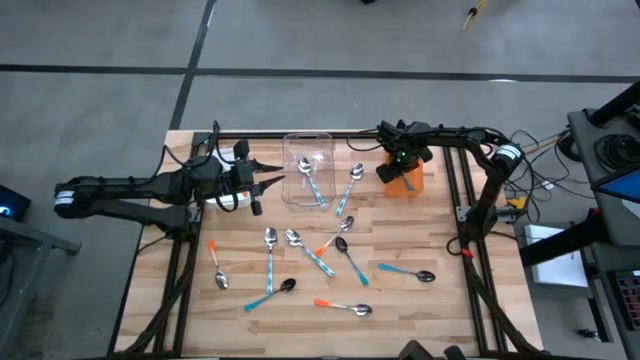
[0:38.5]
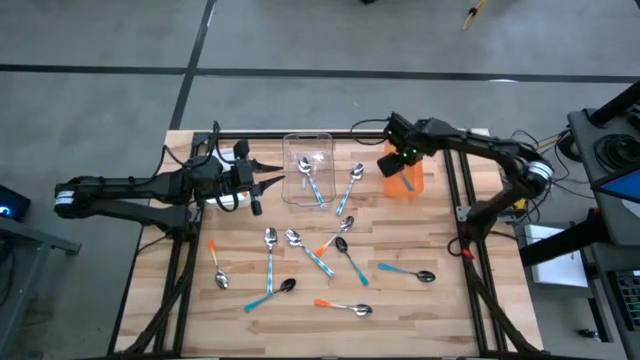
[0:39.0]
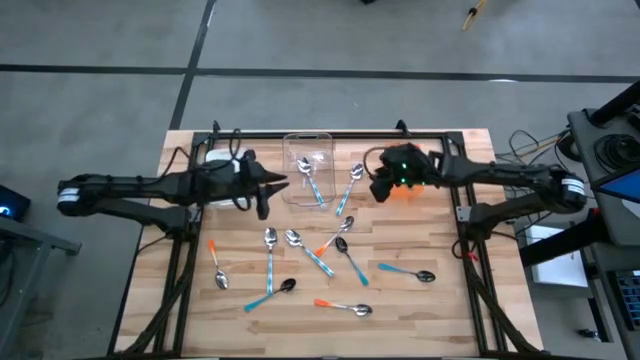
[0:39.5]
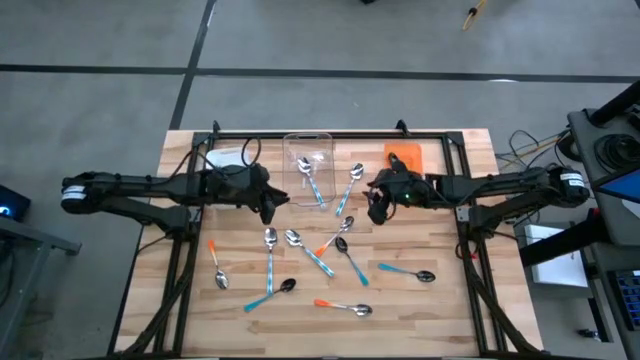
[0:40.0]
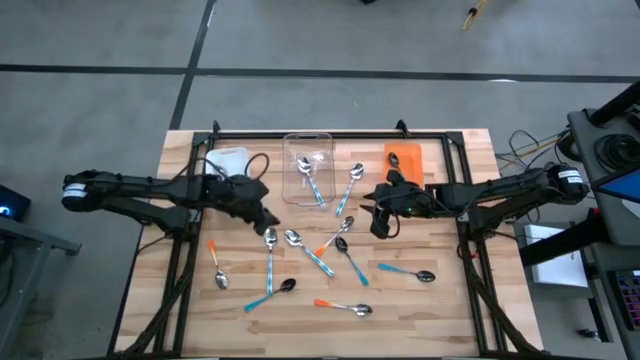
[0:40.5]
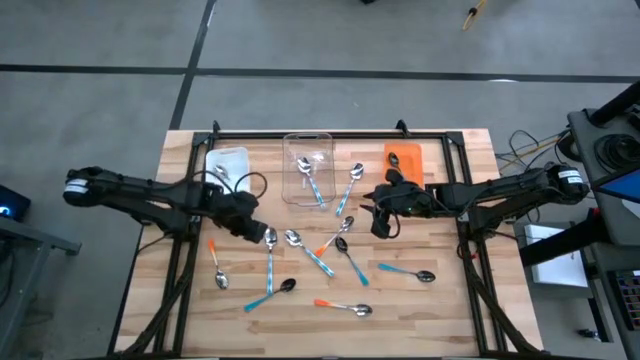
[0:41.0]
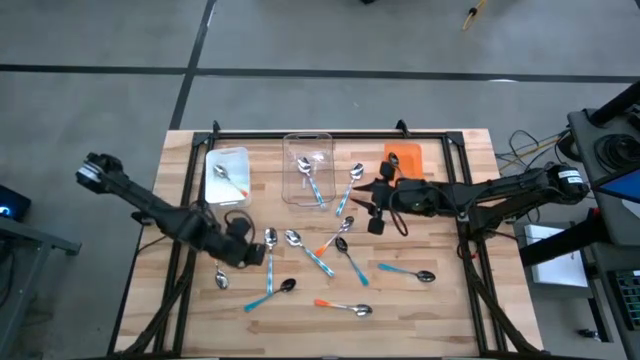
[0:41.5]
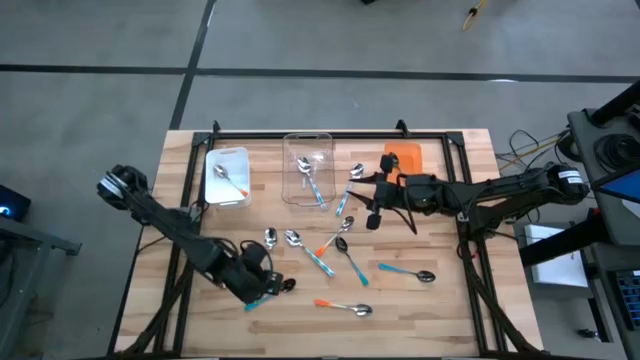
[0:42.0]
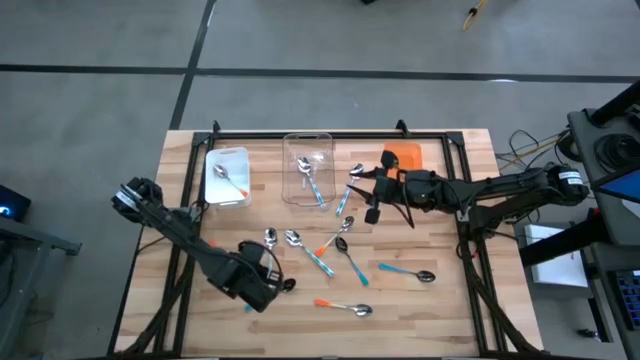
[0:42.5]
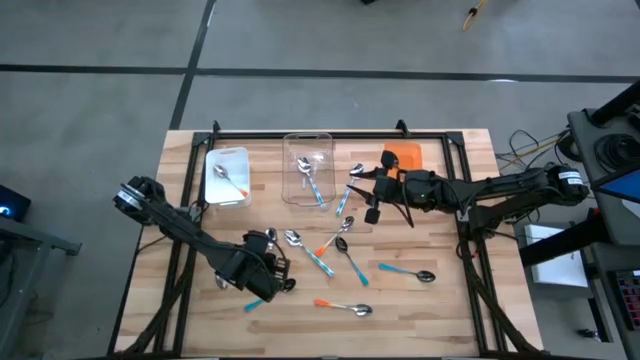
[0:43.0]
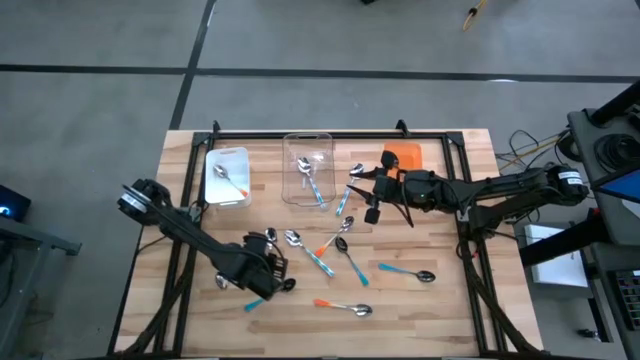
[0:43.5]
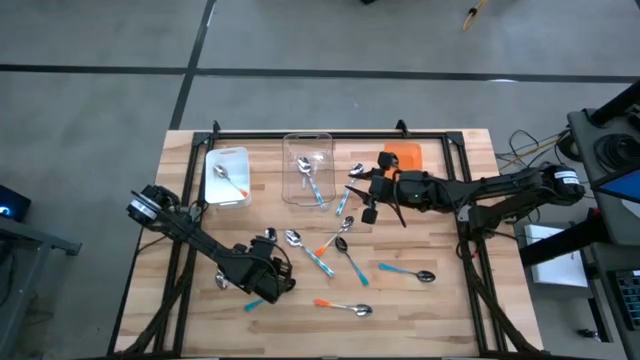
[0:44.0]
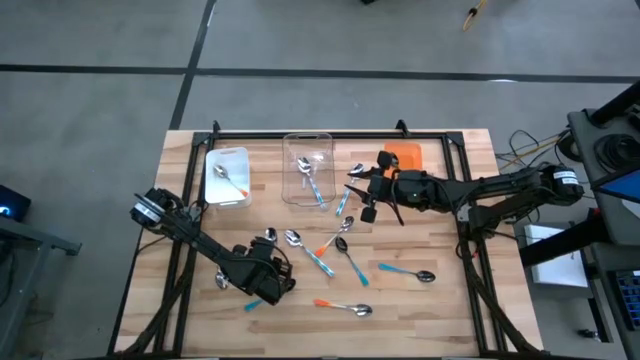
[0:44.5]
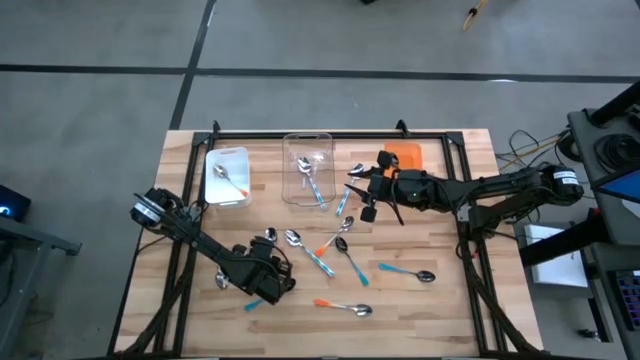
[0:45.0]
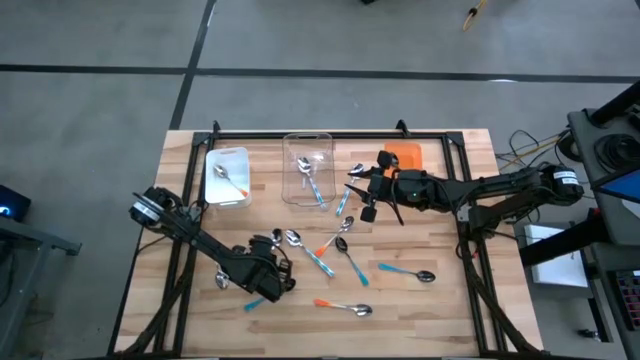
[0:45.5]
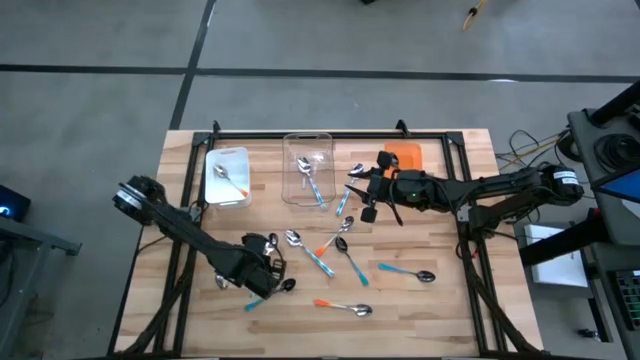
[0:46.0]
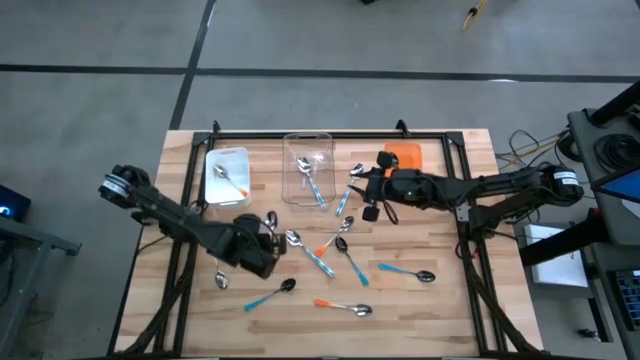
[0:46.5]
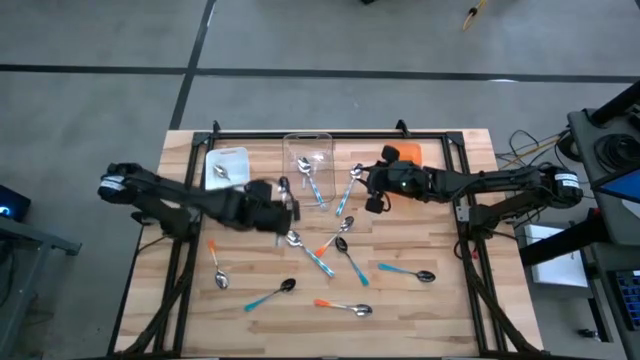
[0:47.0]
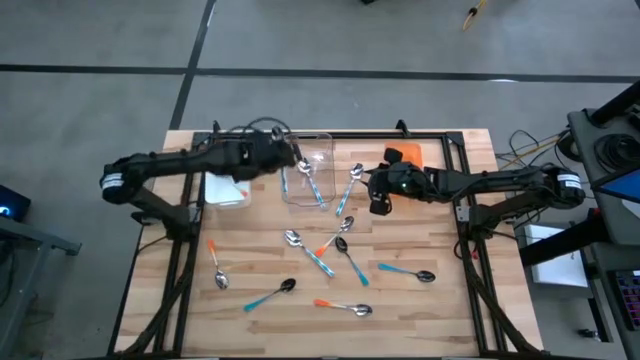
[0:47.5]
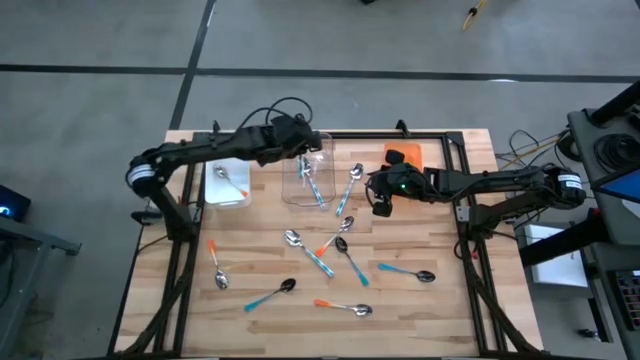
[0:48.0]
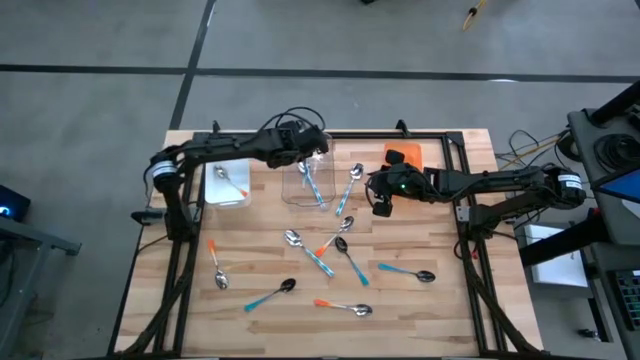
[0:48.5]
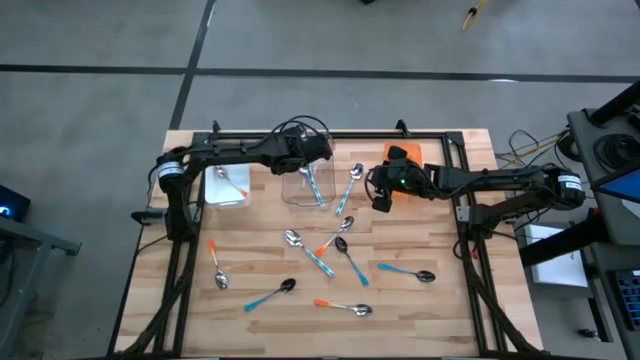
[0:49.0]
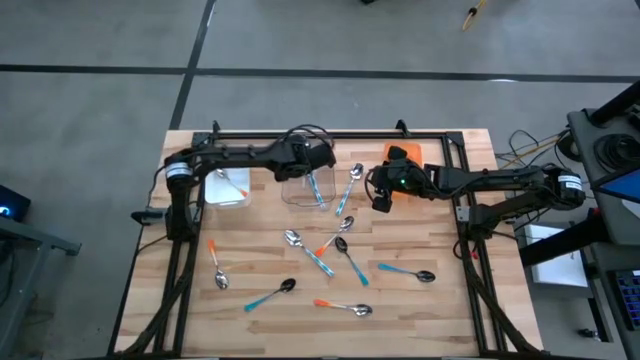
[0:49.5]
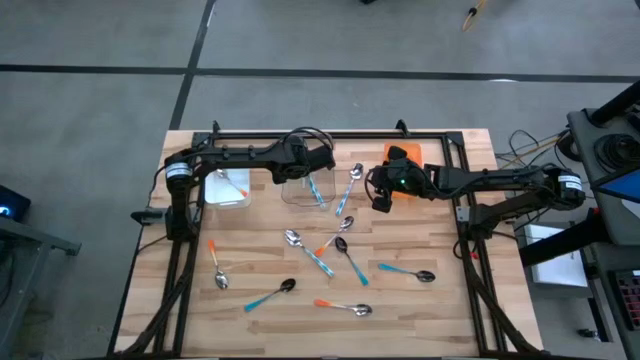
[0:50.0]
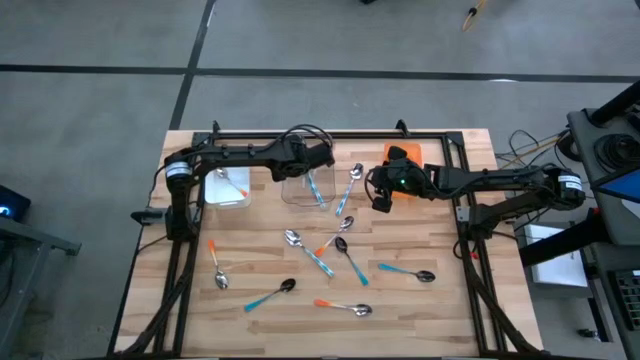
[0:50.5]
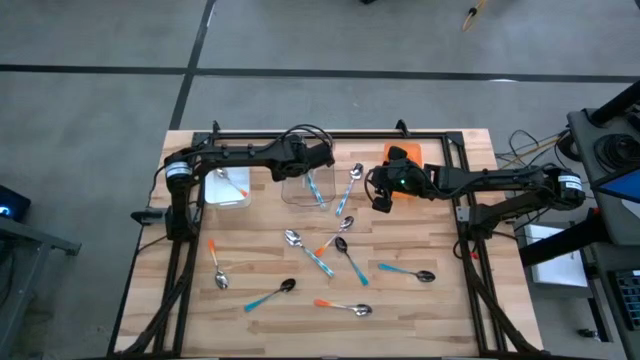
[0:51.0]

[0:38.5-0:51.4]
Task: Sort silverware by color (type)
Put the blue patterned spoon into the transparent bin

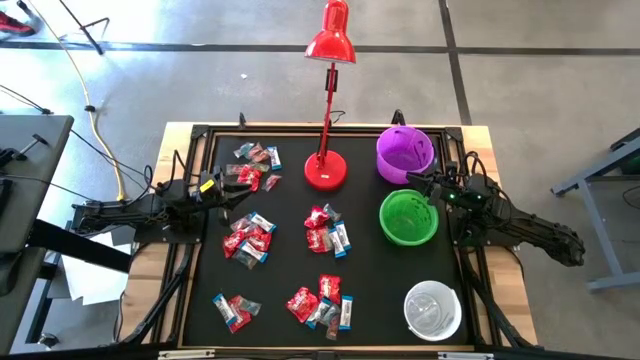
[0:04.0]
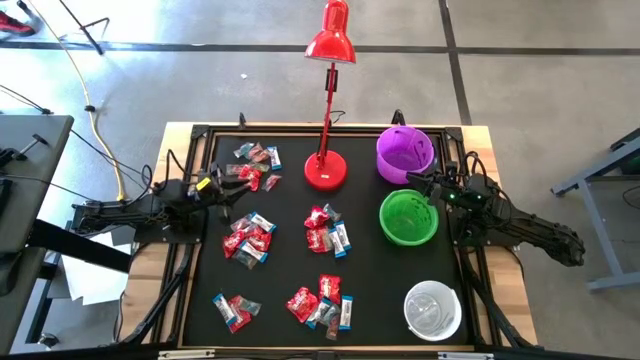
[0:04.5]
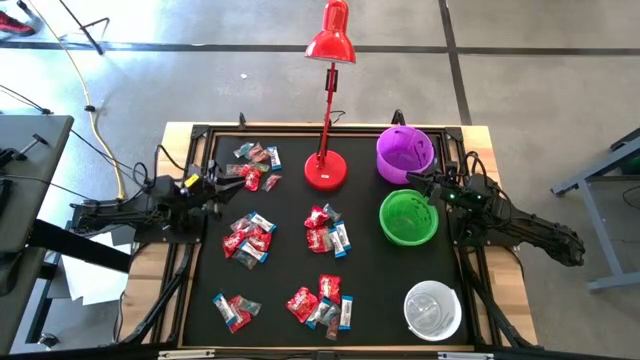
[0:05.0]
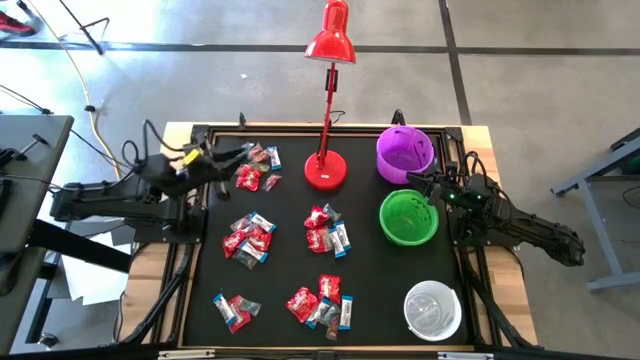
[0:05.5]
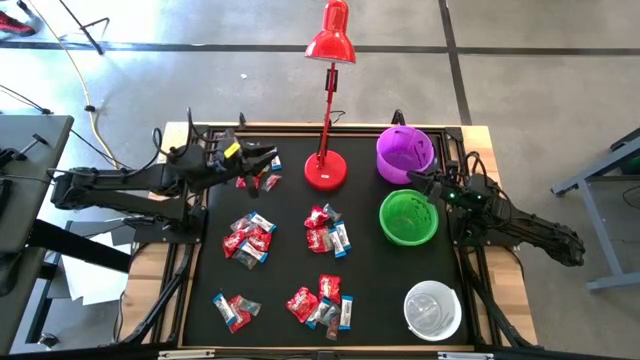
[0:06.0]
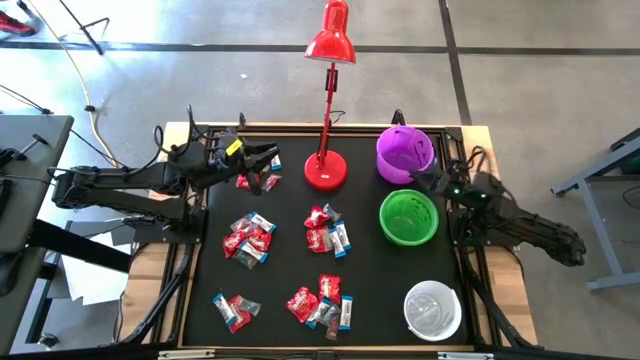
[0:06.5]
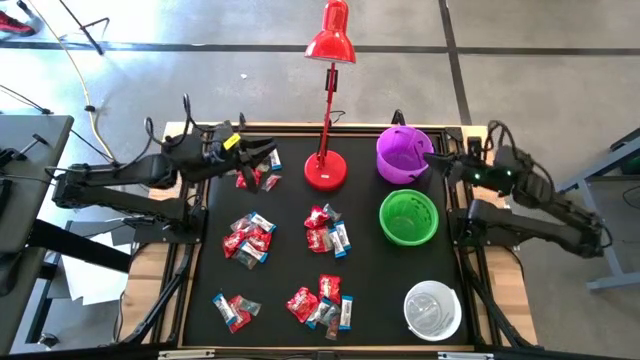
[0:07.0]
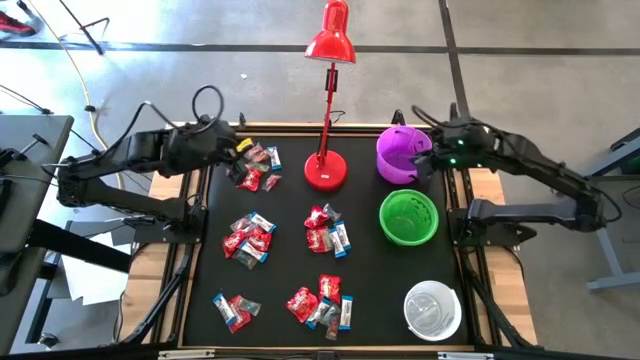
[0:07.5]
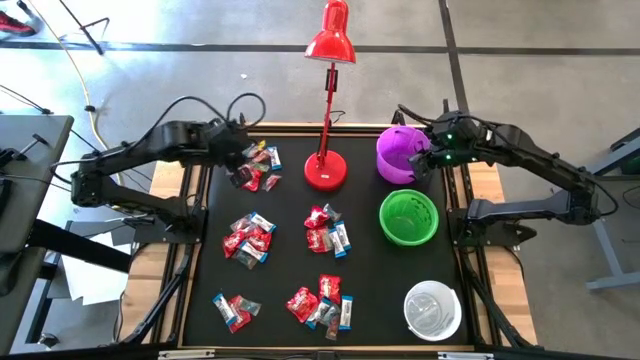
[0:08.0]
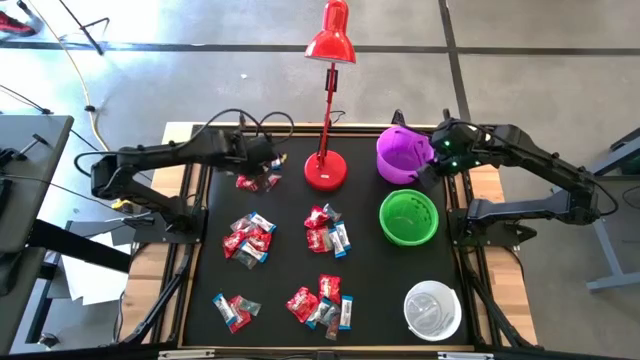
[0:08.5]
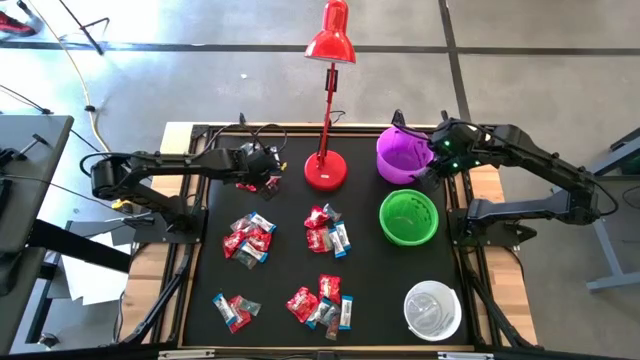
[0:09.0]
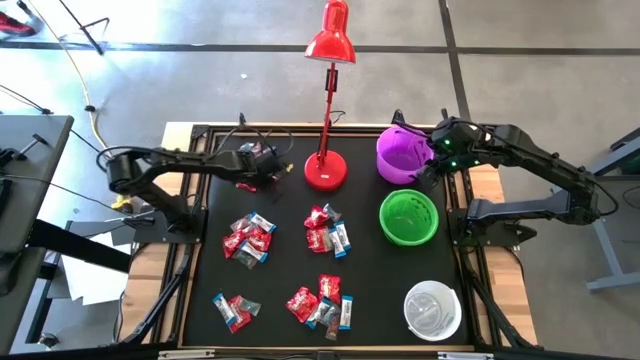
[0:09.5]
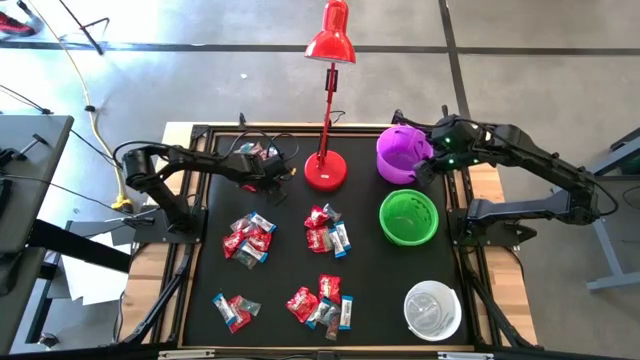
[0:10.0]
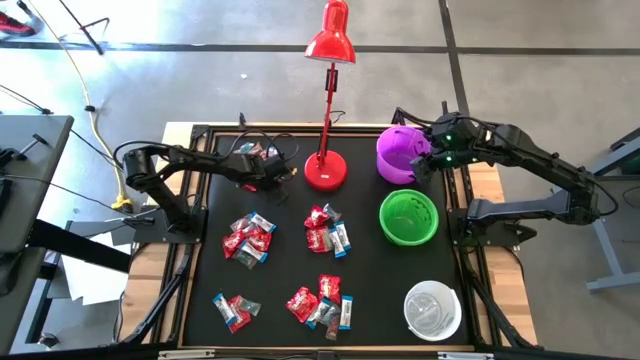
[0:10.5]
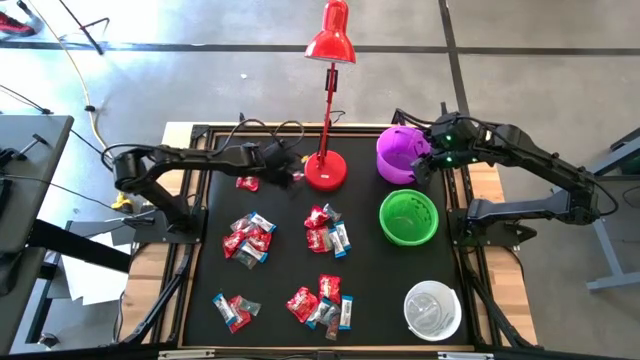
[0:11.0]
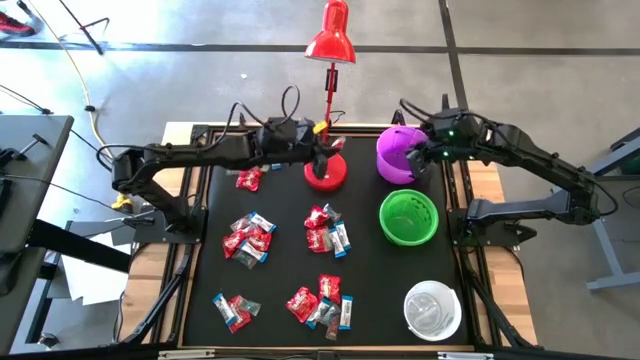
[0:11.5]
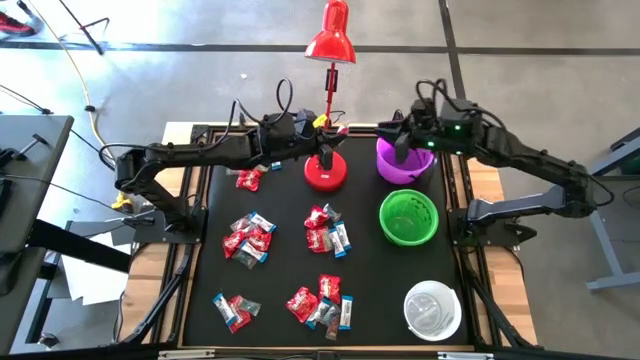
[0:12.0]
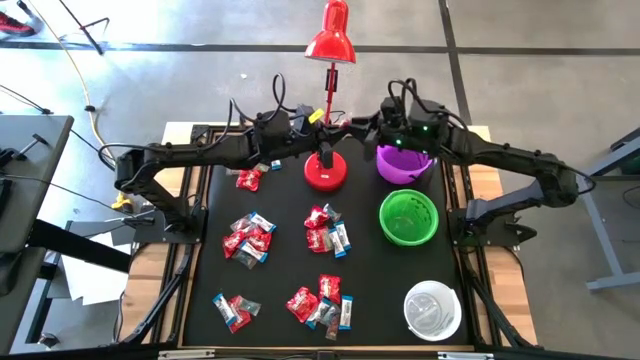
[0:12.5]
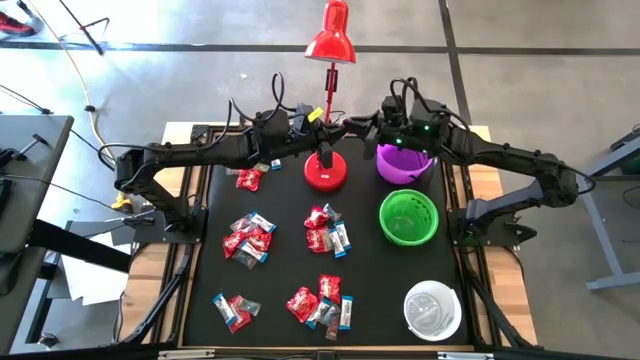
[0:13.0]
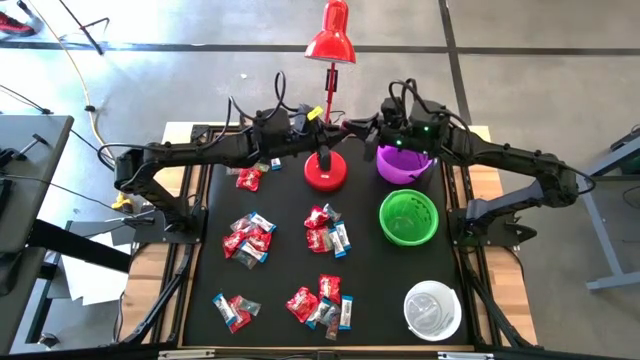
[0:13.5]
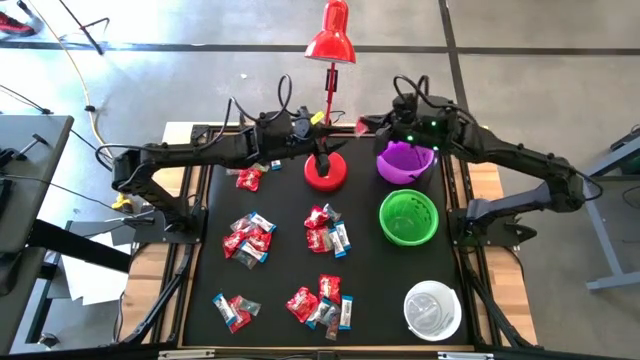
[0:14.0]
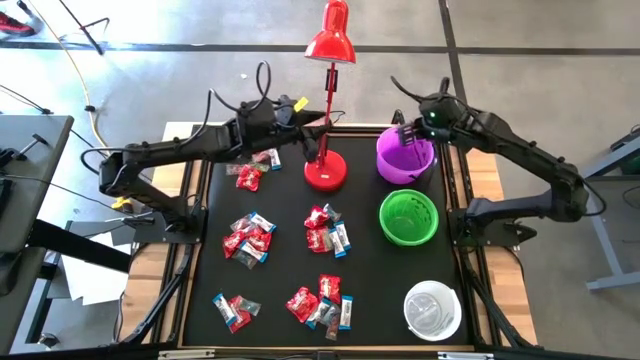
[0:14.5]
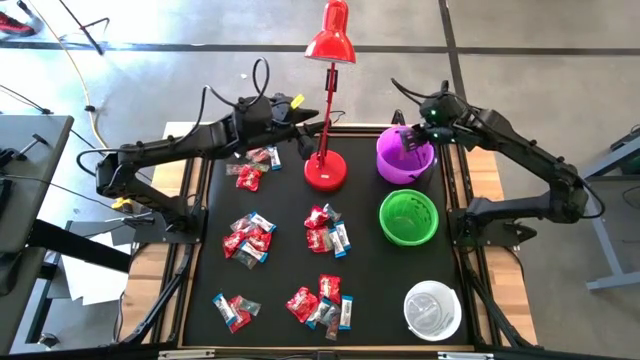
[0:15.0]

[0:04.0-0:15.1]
Task: Organize candy in baskets
Put the red gummy into the violet bucket
